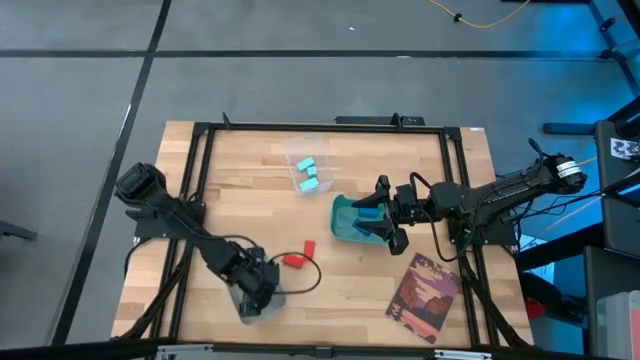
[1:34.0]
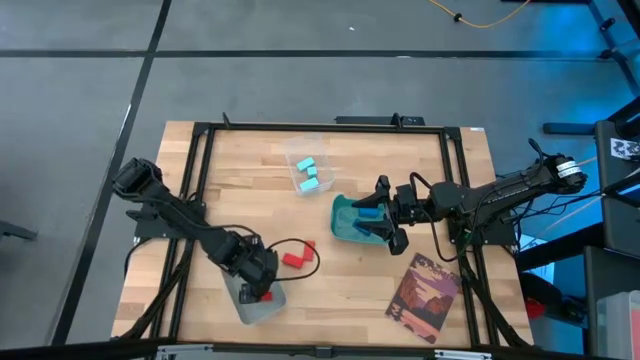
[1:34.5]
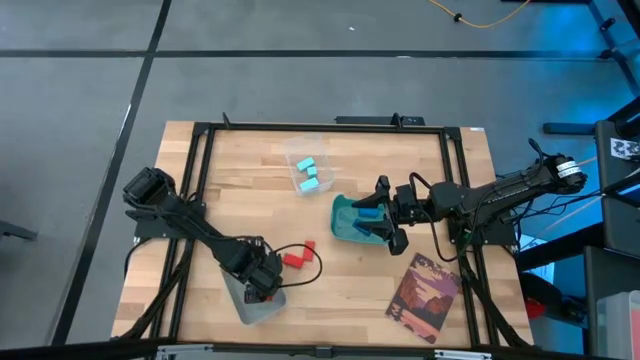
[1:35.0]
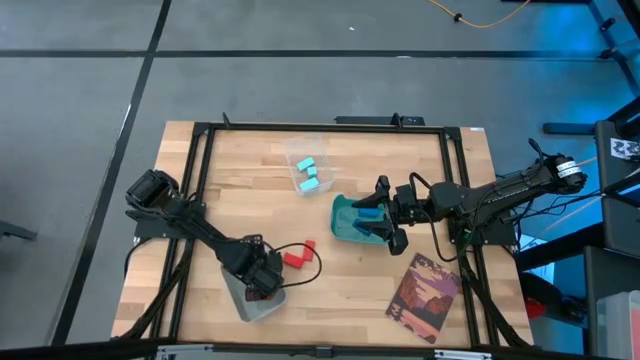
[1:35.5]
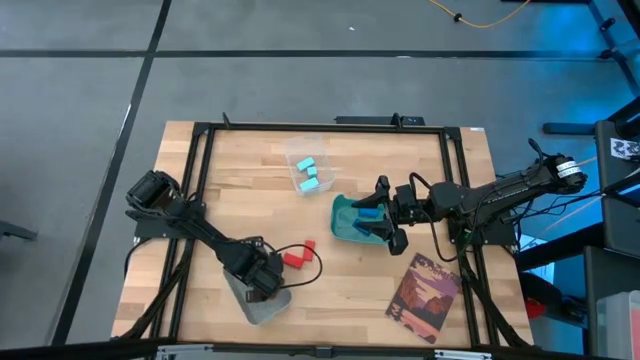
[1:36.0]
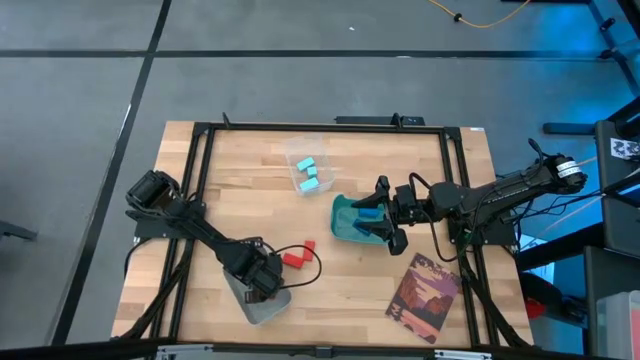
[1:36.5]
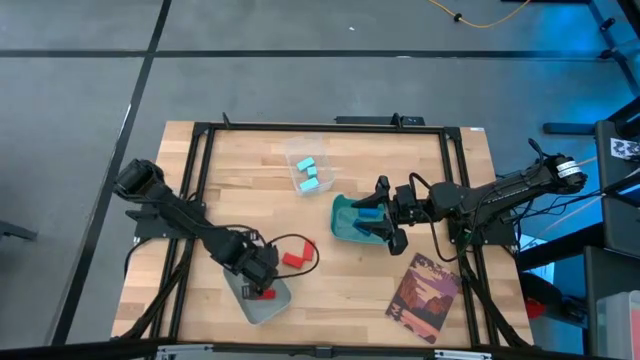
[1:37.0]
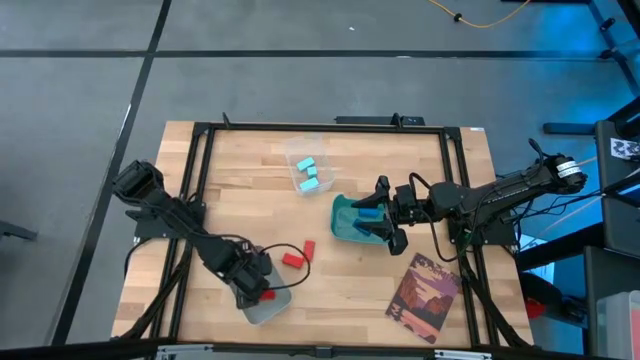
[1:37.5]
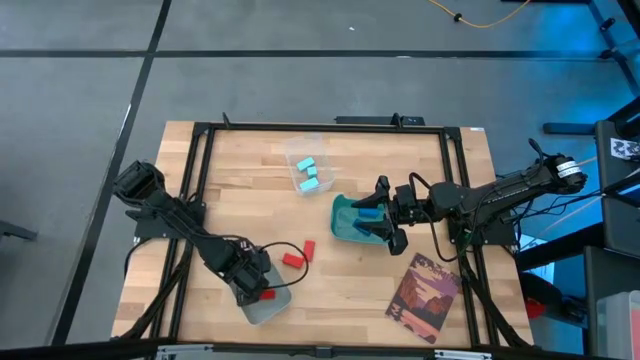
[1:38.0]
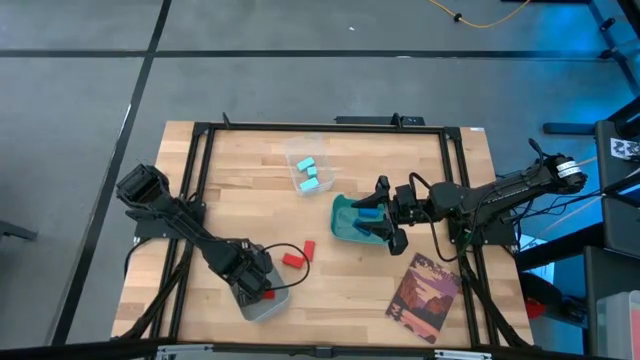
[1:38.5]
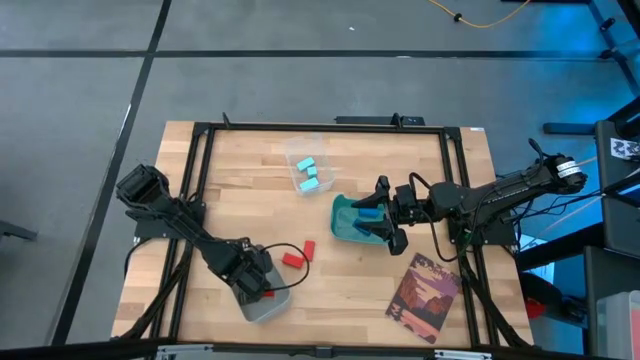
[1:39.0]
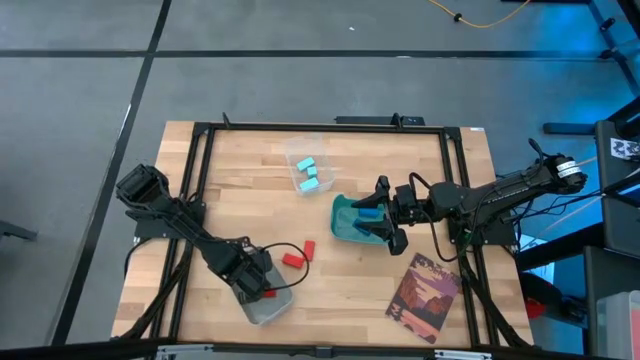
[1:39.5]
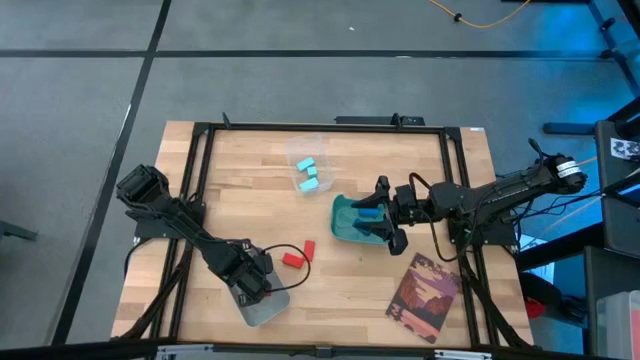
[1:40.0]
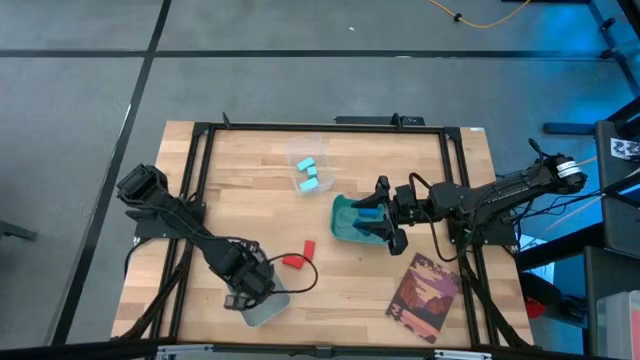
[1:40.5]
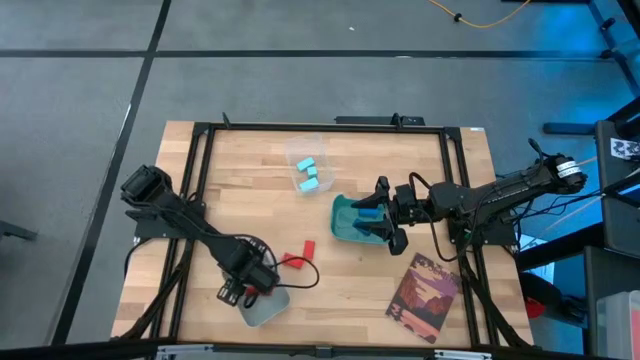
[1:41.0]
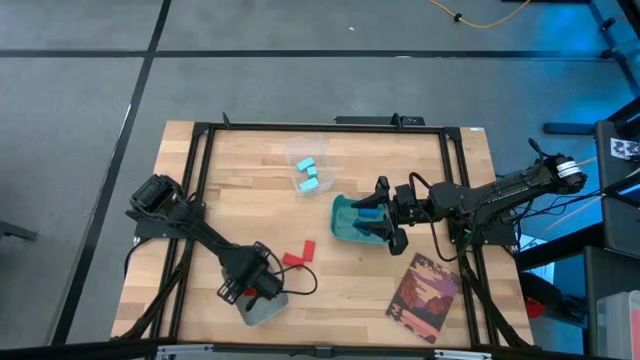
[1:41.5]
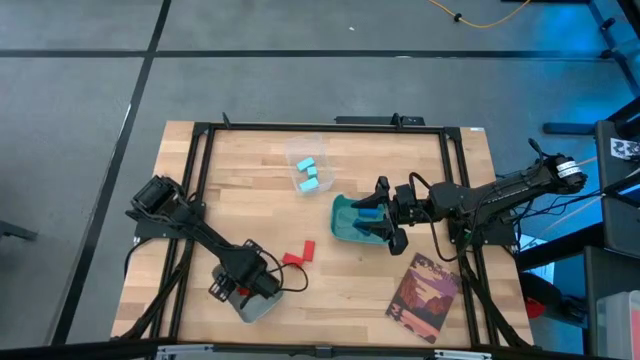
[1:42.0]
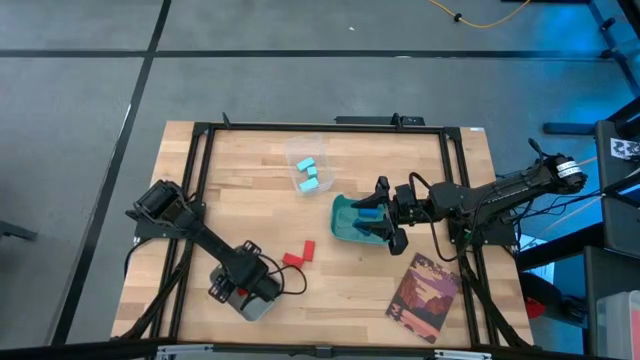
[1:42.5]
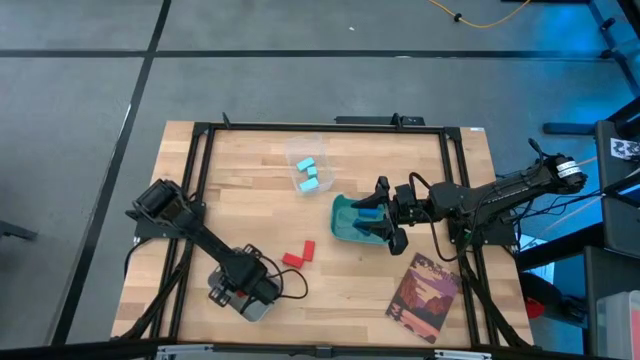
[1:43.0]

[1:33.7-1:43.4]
Task: Sort & place blocks by color
Put the blue block into the green bin

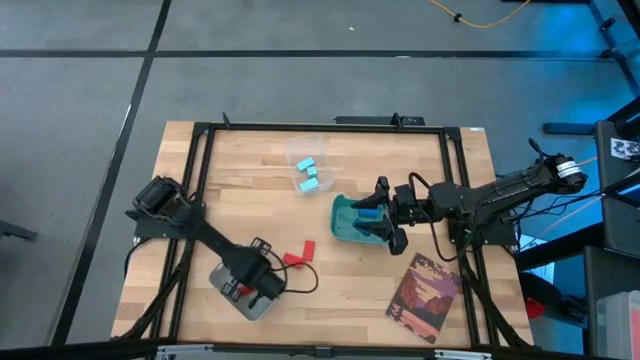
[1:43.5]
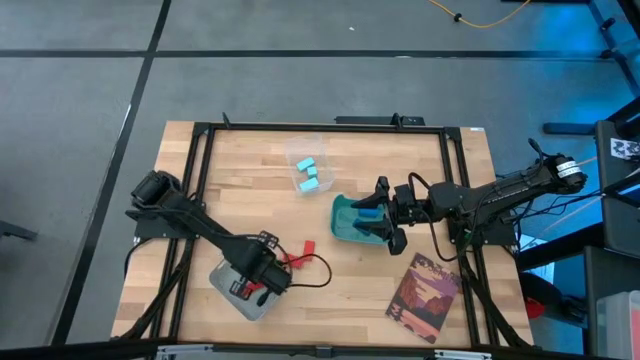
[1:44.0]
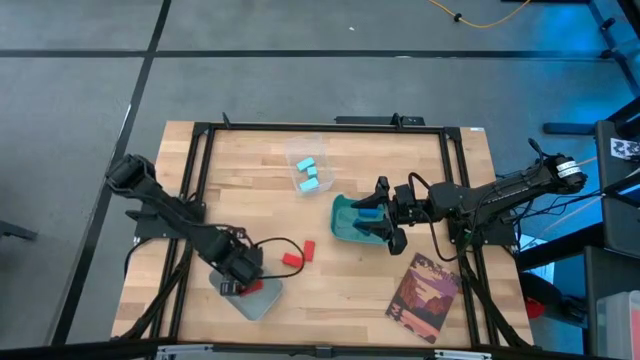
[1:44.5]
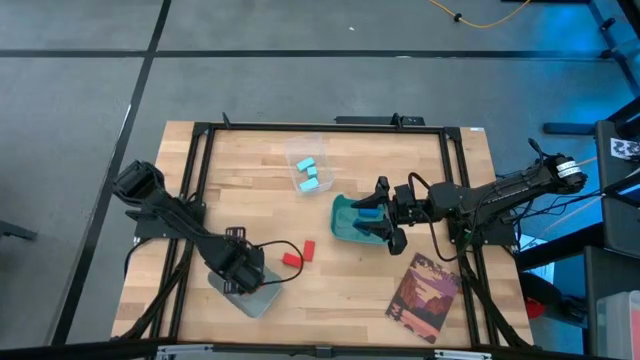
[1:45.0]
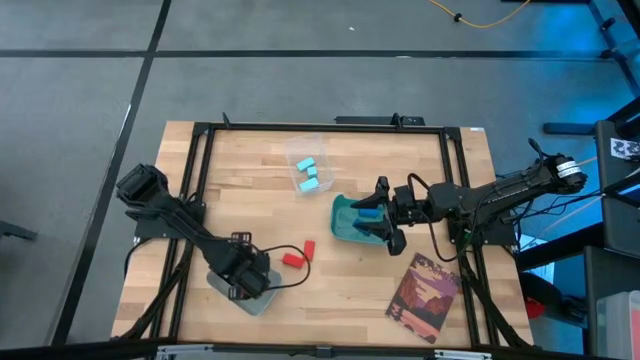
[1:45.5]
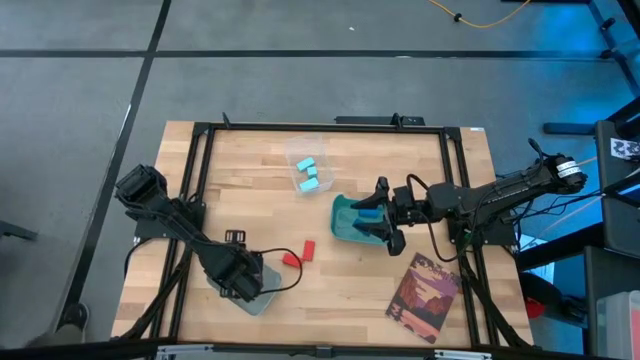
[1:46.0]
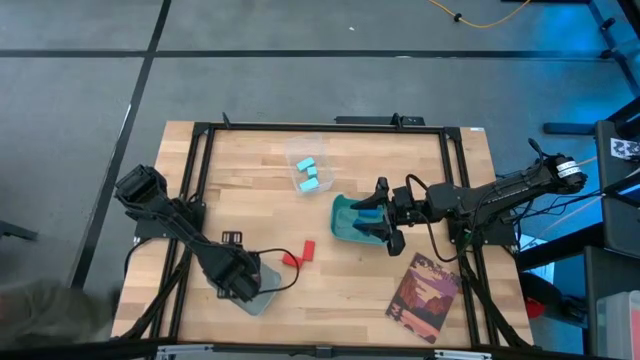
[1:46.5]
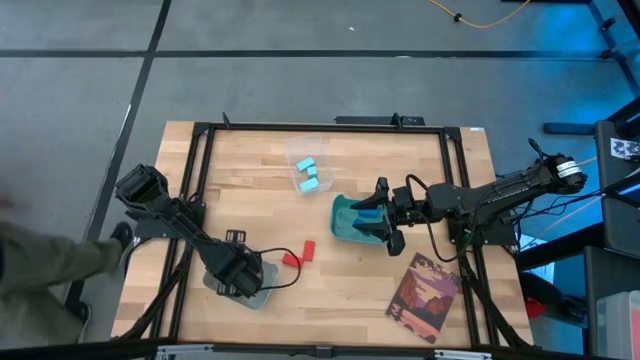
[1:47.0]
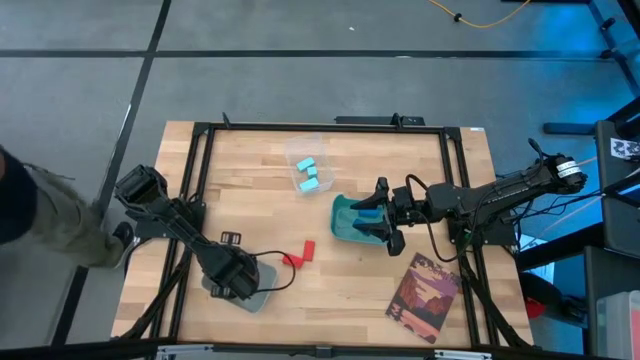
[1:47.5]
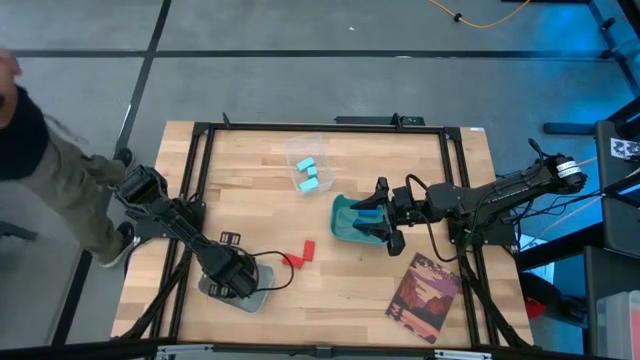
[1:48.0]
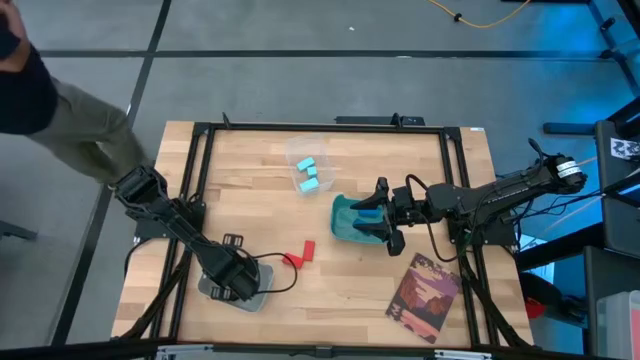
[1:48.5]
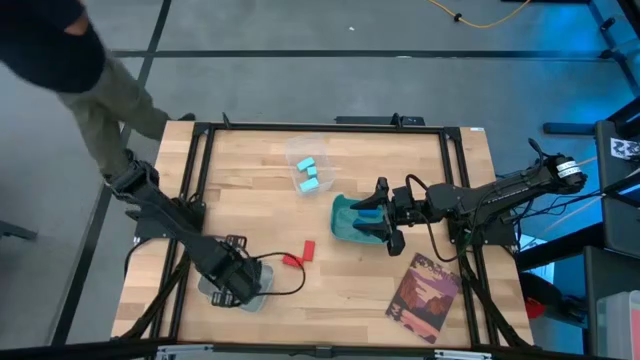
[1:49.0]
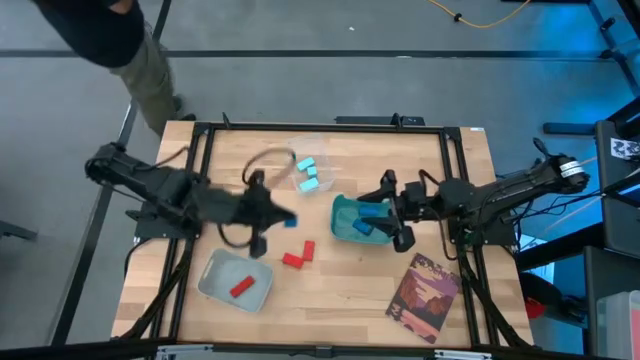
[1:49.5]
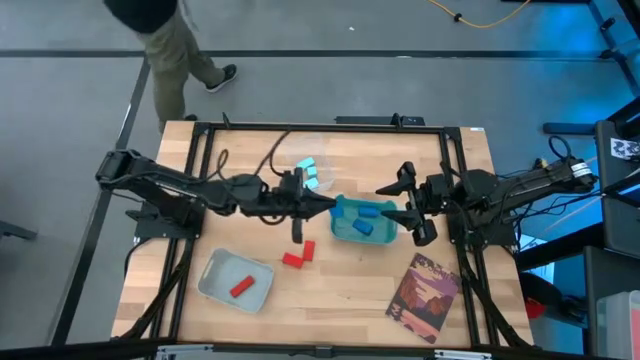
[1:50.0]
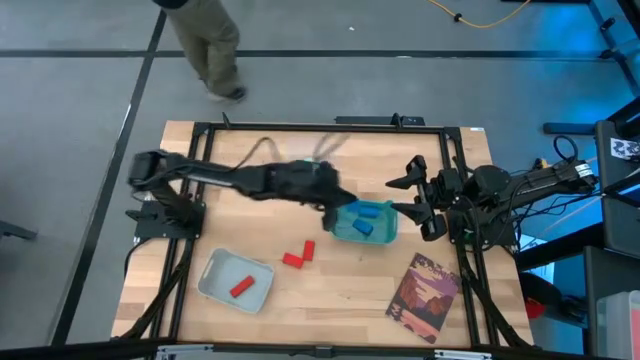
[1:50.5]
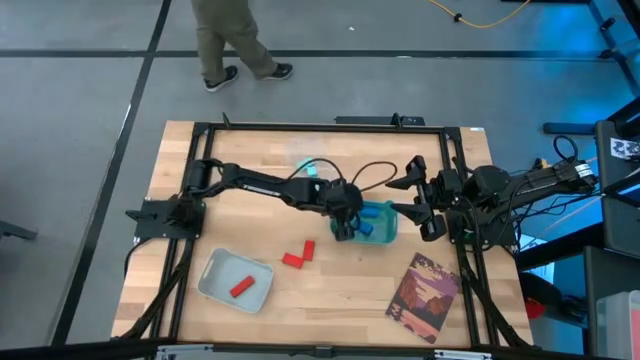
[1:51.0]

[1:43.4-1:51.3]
Put the blue block into the green bin

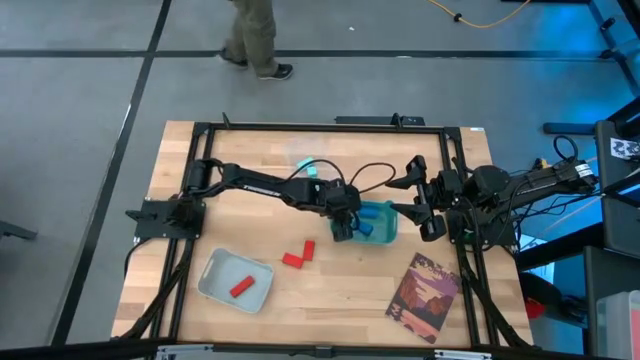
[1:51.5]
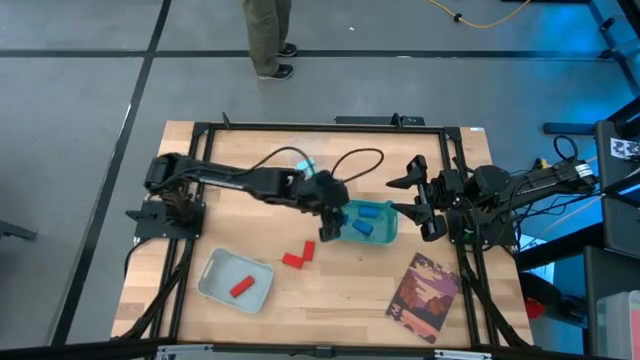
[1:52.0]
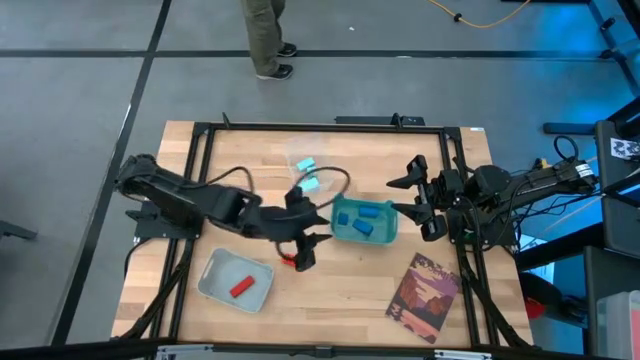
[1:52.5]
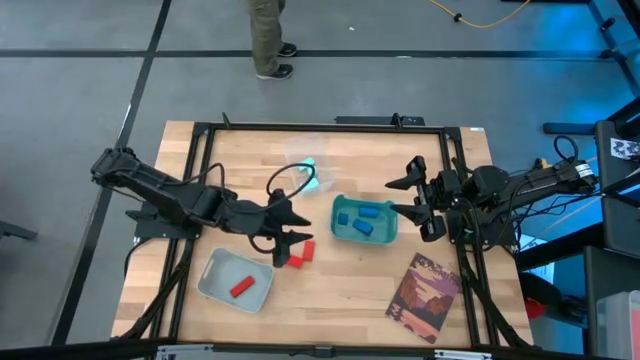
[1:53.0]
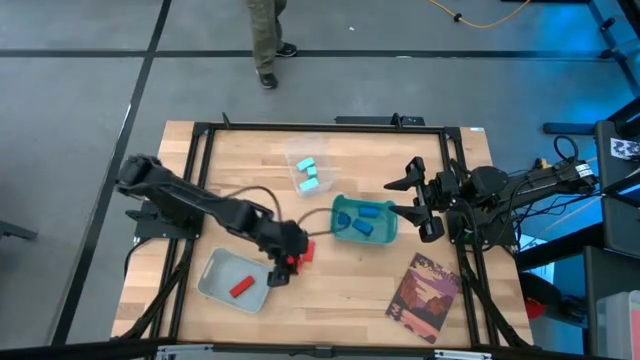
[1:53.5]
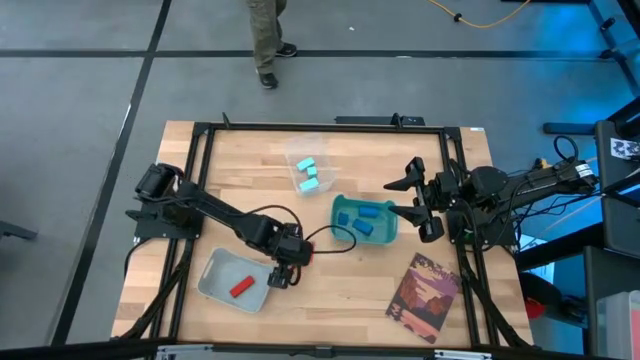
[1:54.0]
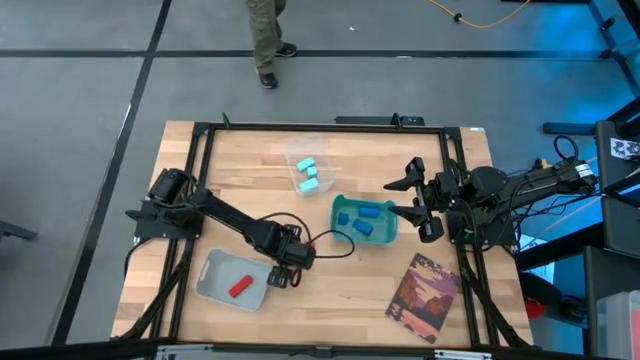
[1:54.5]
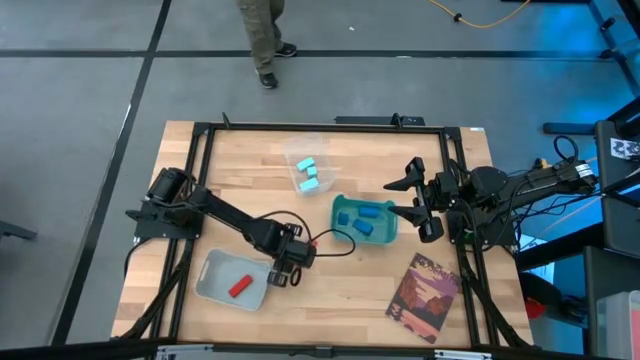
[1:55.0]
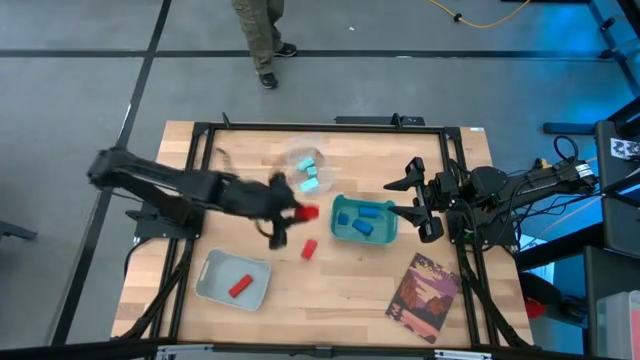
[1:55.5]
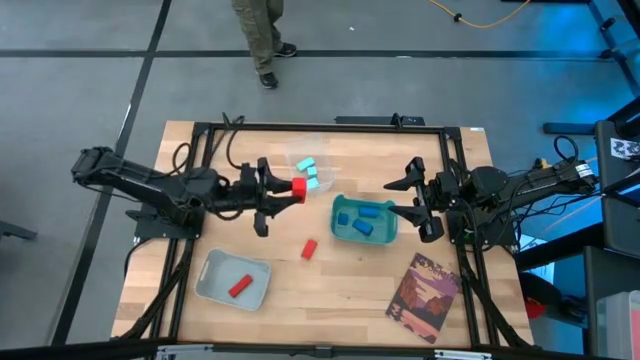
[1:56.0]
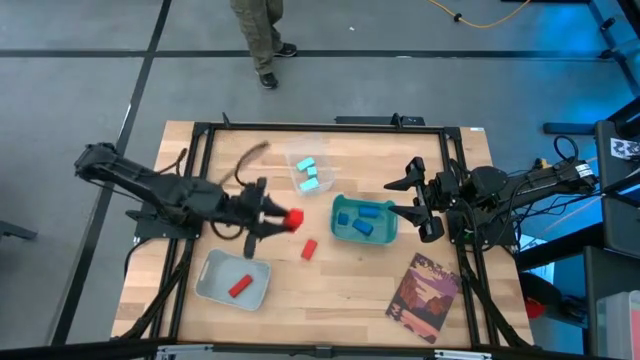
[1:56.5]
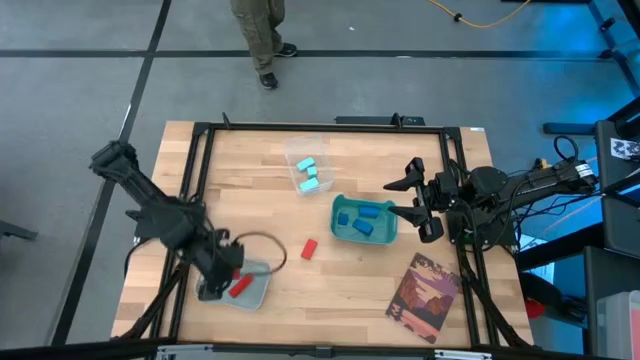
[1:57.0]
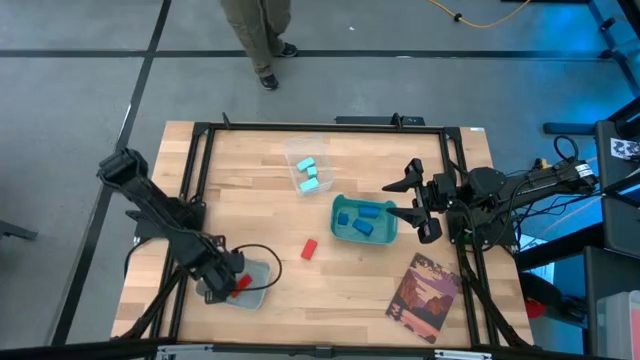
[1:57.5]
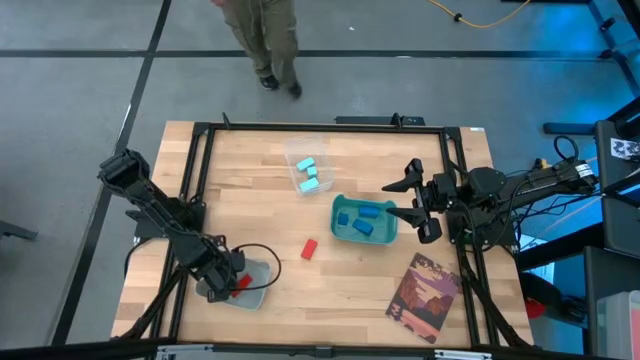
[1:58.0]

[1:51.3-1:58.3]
Put the red block into the gray bin
